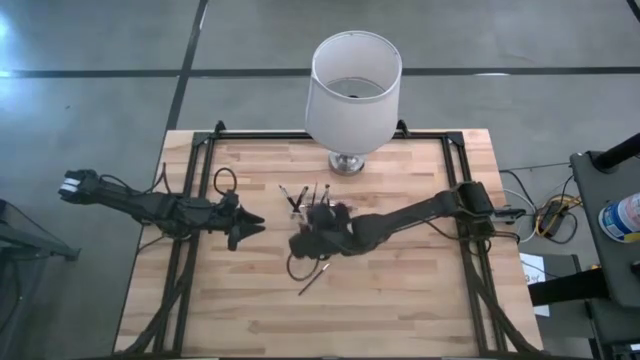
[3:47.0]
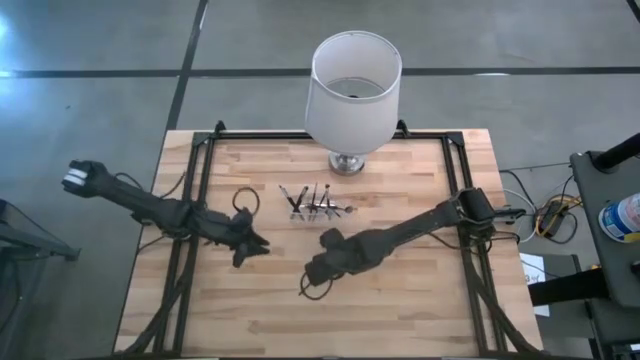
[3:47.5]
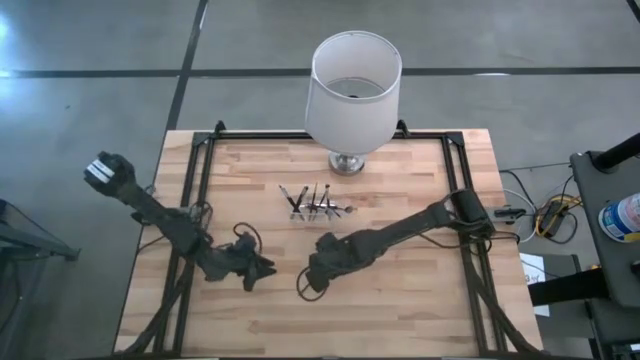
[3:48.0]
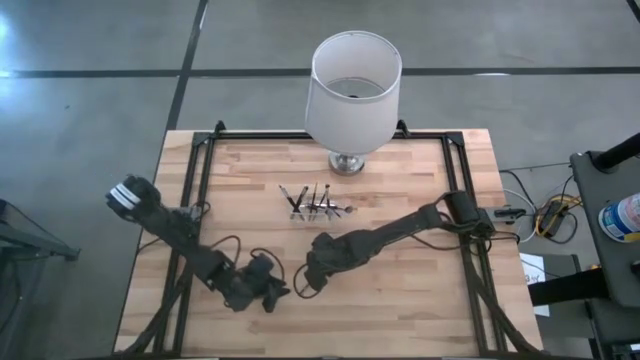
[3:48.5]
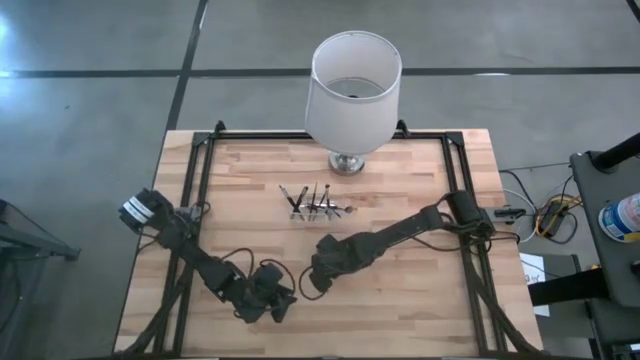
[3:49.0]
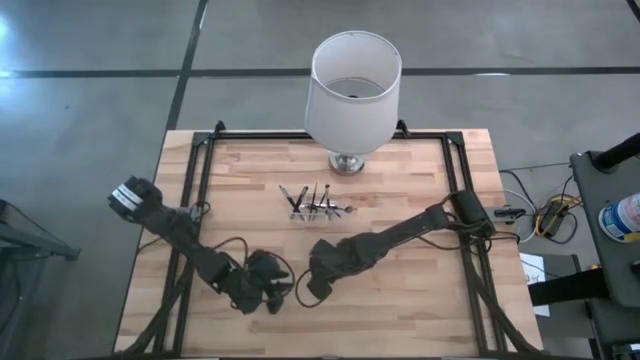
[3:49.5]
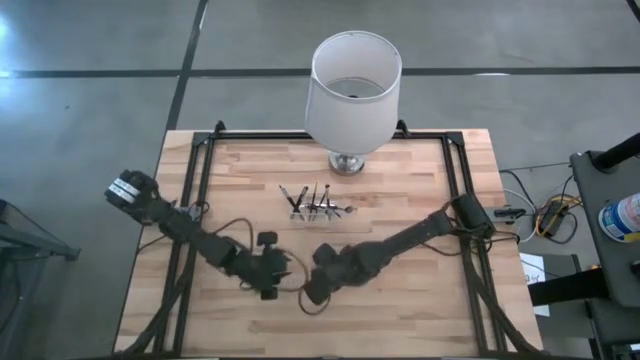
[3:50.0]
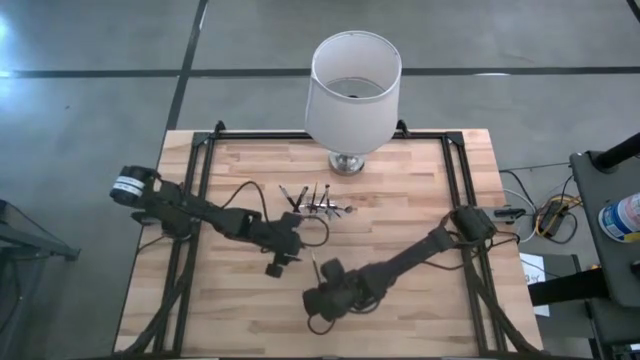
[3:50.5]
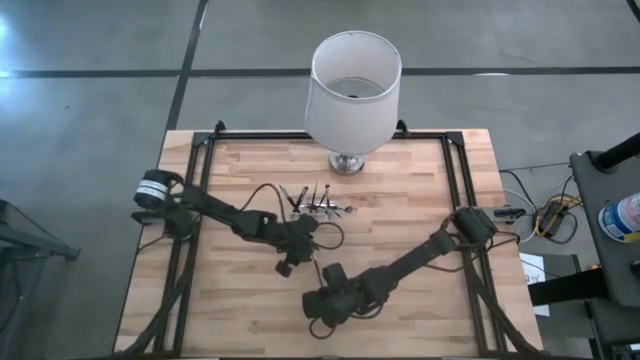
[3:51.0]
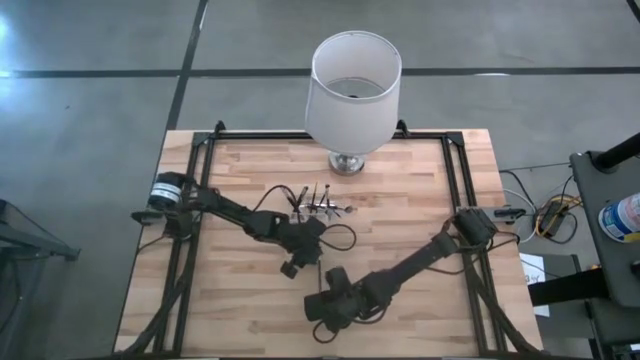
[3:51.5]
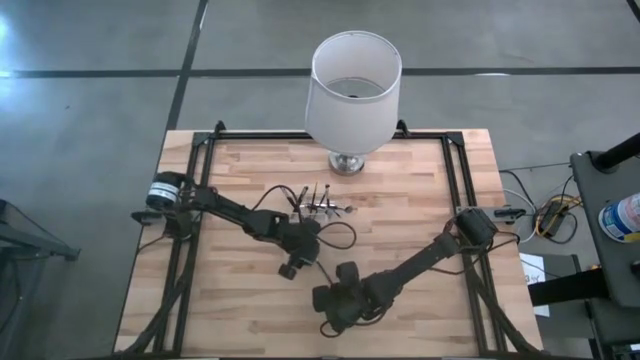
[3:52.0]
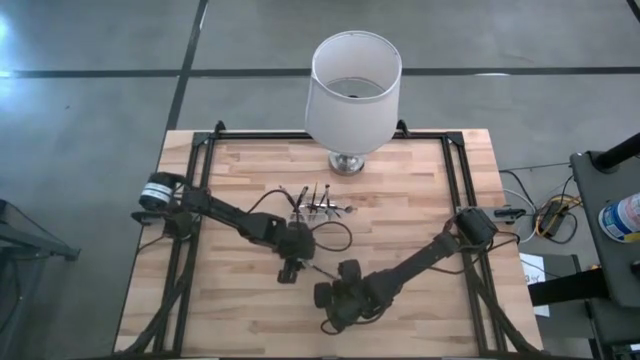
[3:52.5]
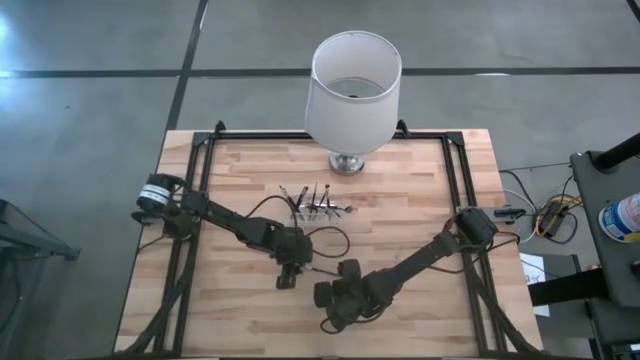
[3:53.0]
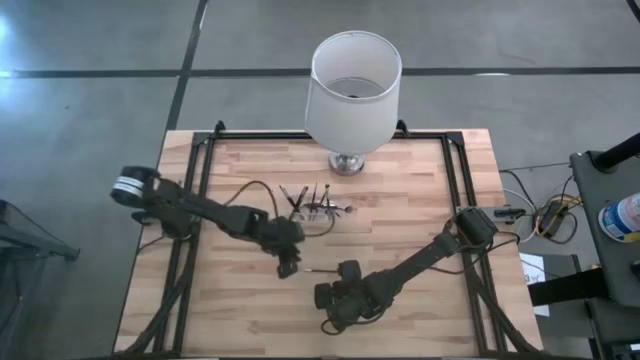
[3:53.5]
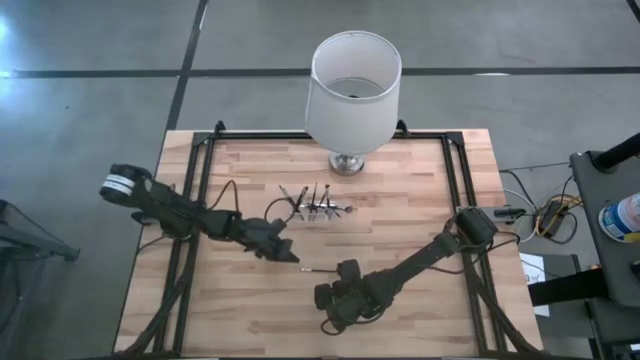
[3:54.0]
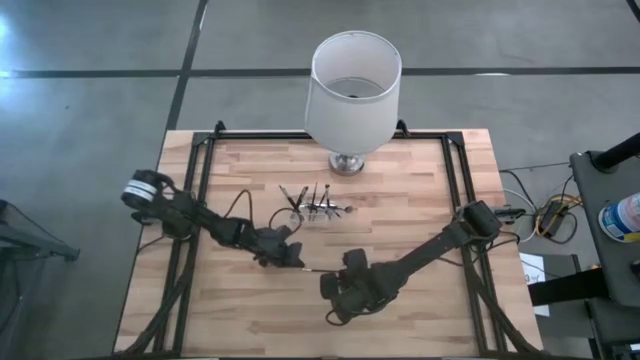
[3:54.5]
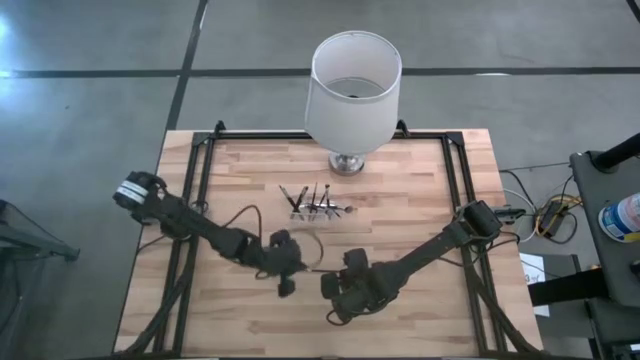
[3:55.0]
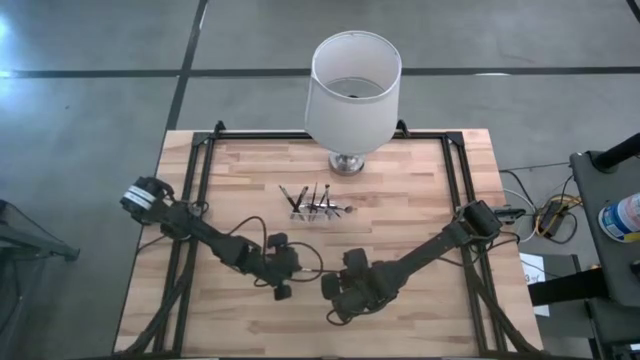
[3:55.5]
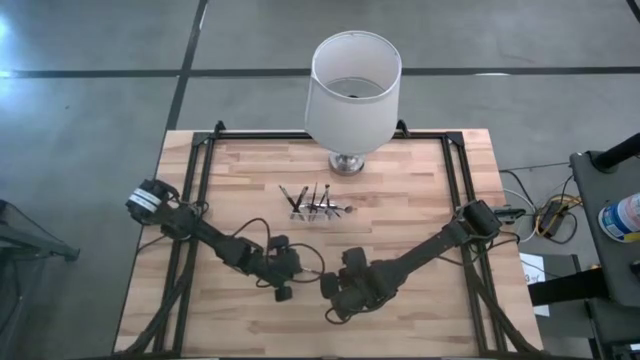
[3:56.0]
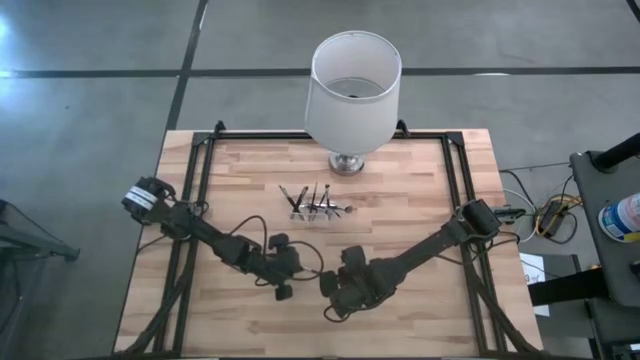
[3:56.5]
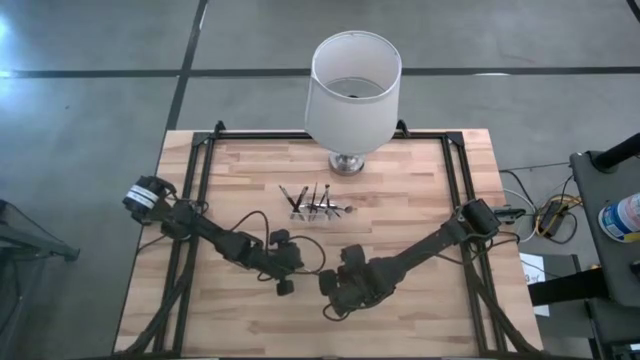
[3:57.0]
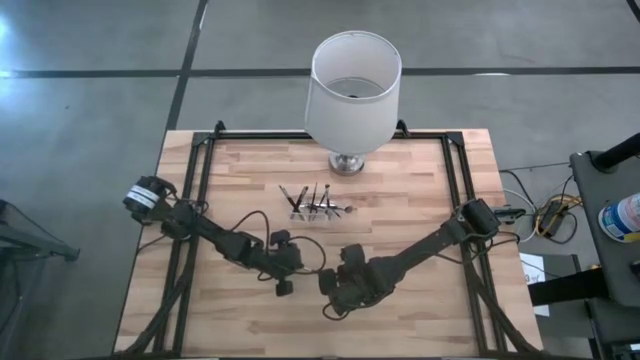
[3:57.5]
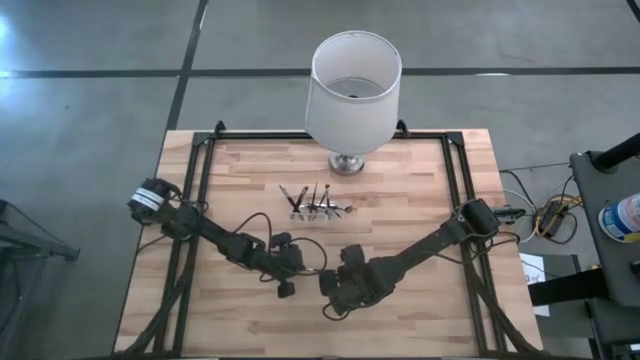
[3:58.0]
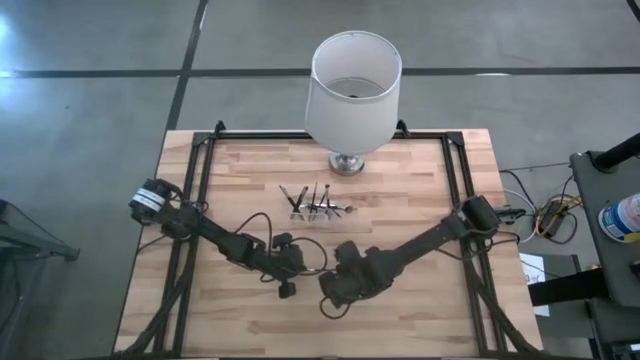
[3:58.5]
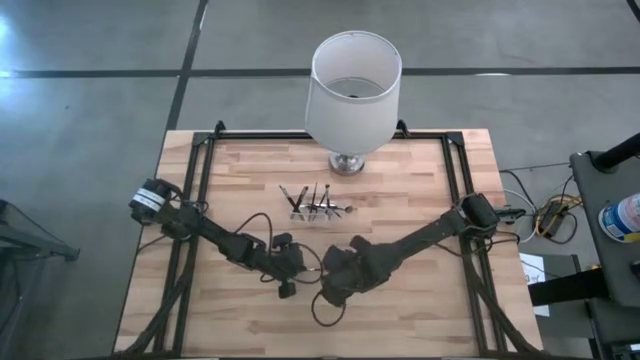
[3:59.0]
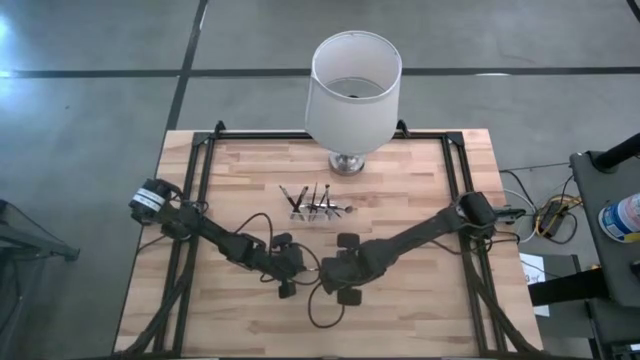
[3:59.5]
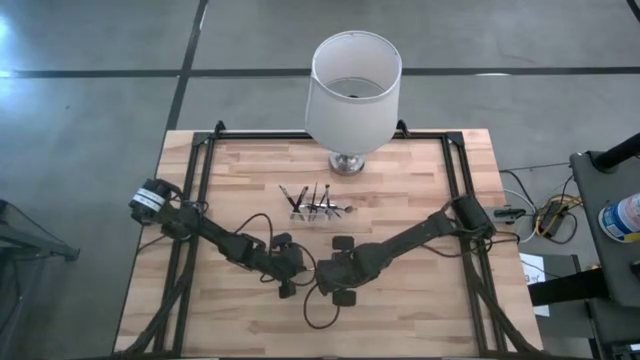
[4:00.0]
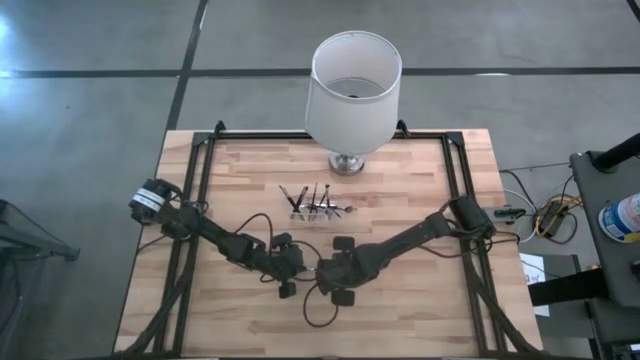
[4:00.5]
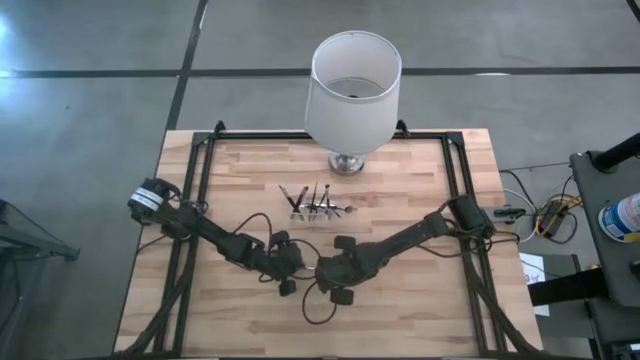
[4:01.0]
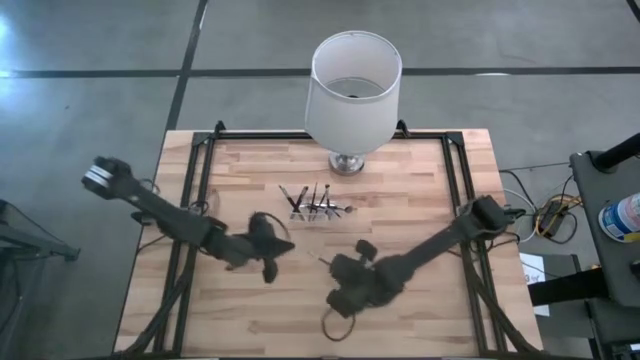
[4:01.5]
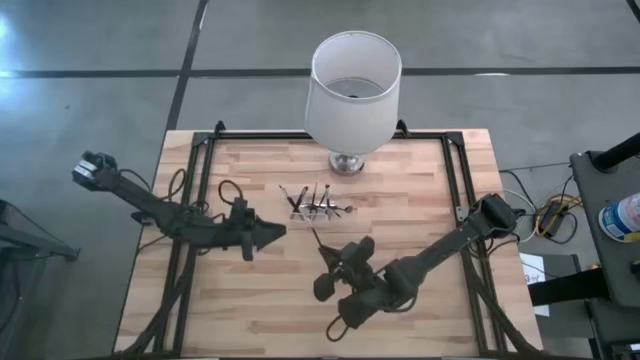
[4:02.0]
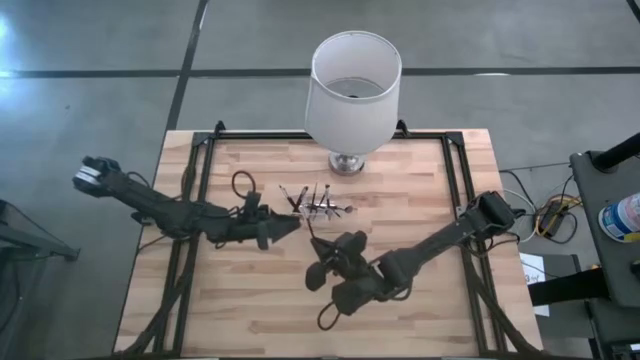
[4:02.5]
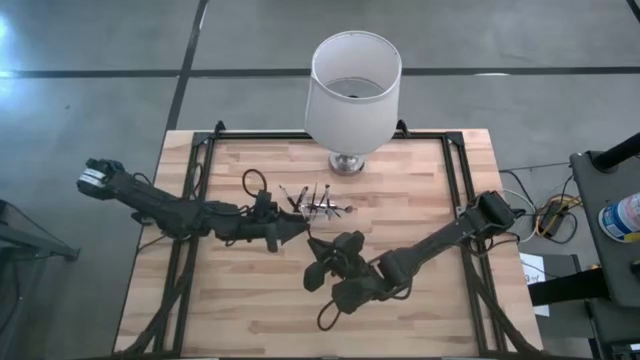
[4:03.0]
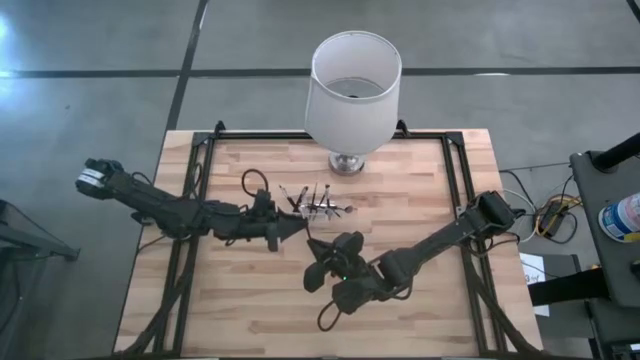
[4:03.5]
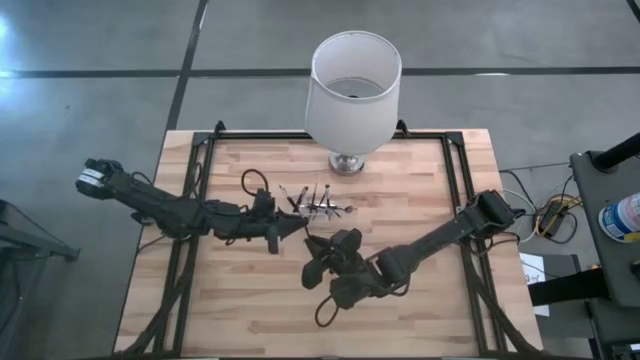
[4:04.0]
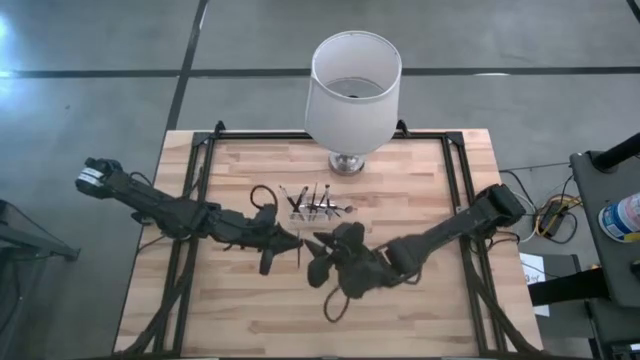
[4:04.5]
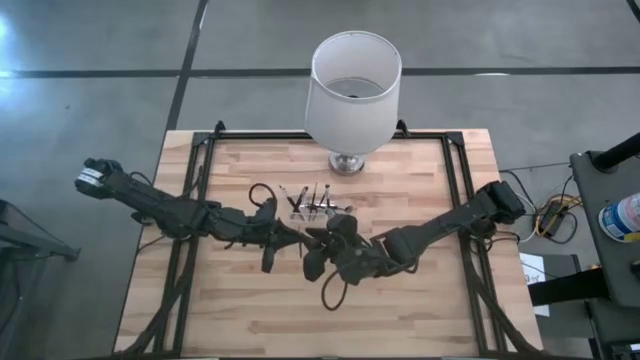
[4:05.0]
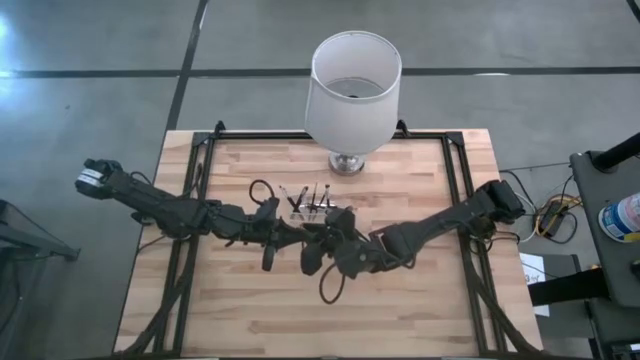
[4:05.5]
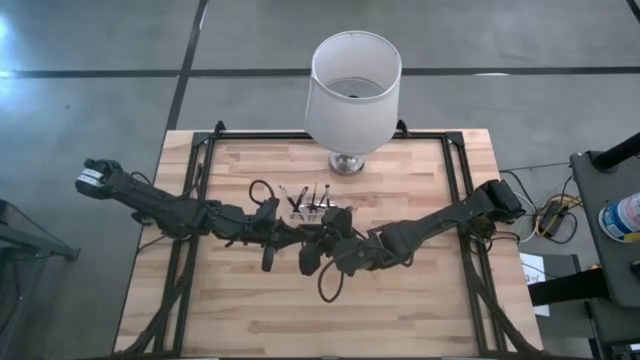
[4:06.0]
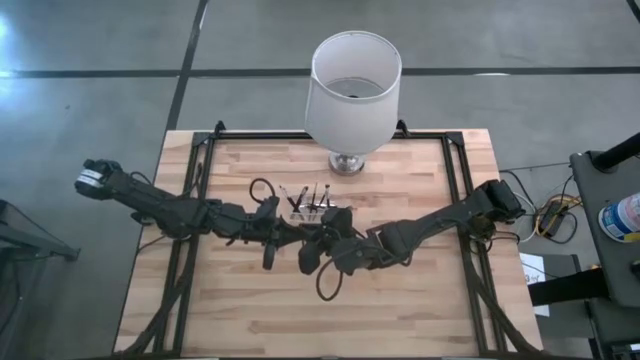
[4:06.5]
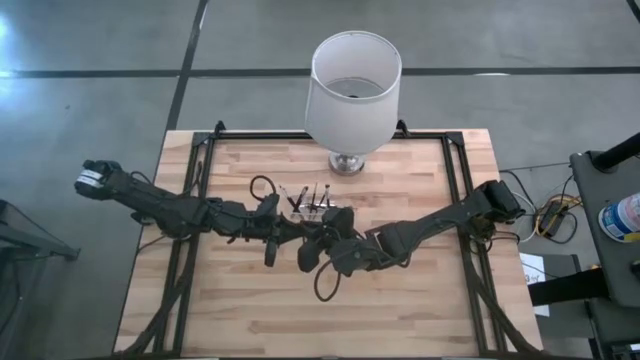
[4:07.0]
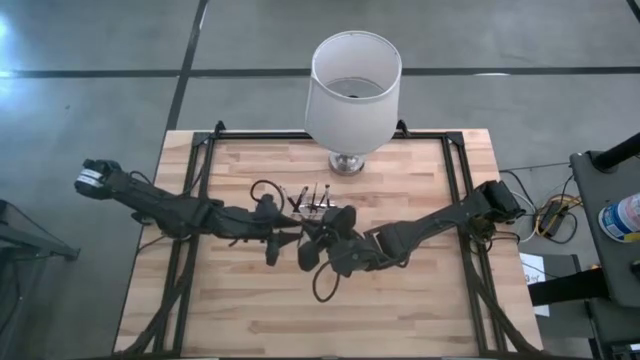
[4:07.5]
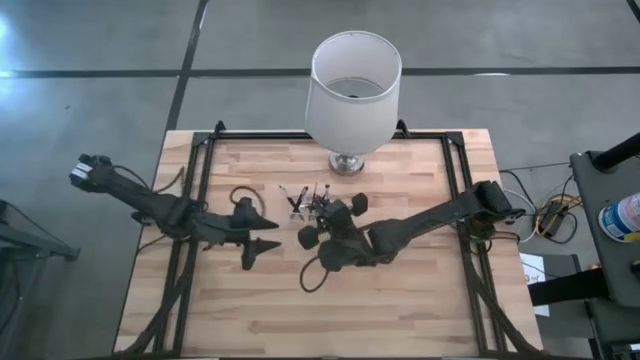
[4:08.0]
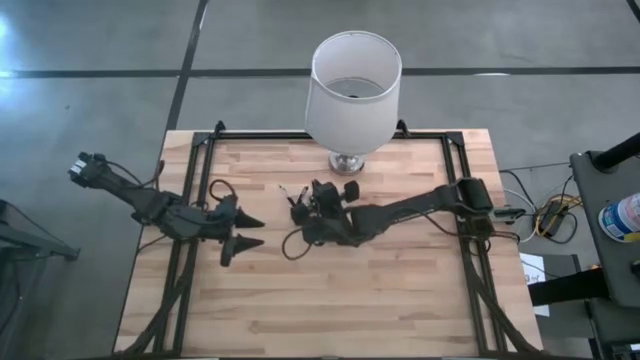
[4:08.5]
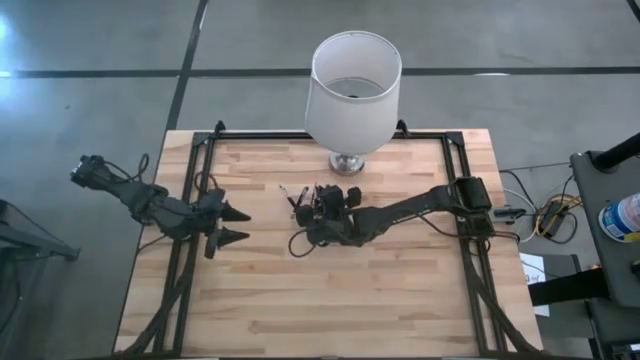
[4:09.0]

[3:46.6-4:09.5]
Task: Put items in baskets/containers
Put the eyeshadow brush into the transparent organizer
